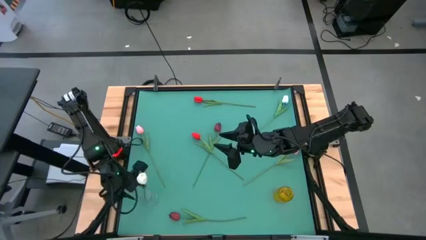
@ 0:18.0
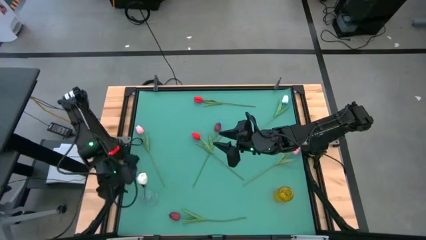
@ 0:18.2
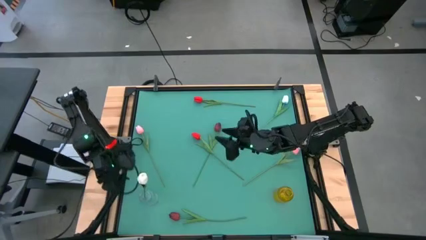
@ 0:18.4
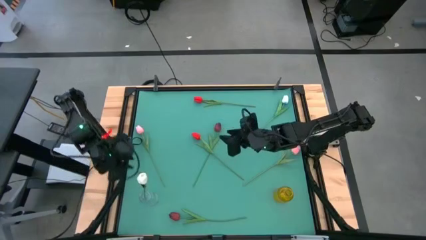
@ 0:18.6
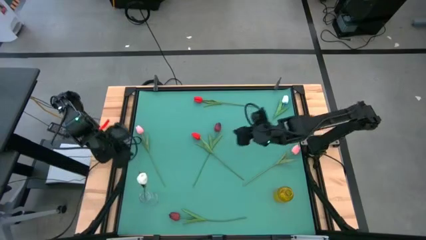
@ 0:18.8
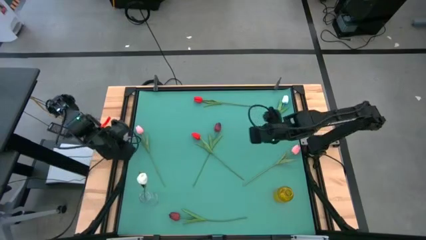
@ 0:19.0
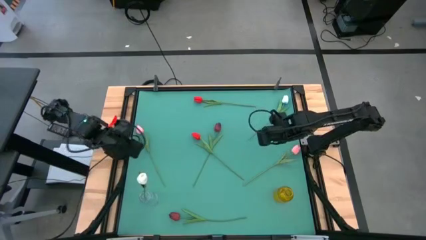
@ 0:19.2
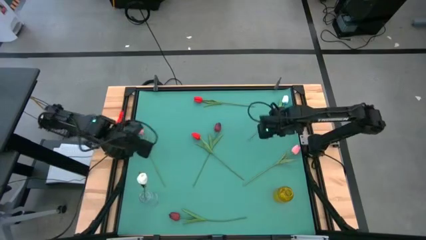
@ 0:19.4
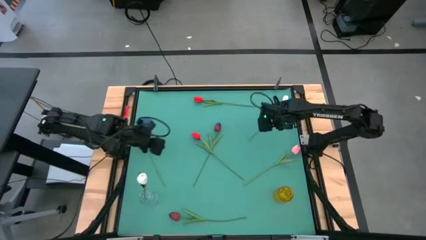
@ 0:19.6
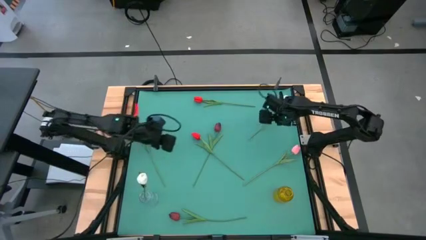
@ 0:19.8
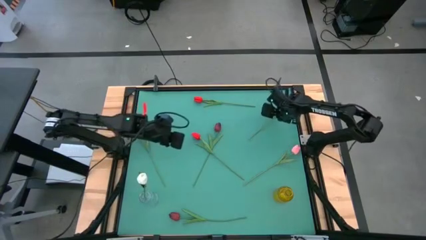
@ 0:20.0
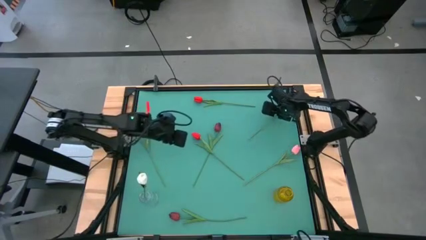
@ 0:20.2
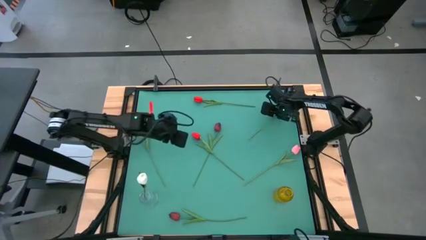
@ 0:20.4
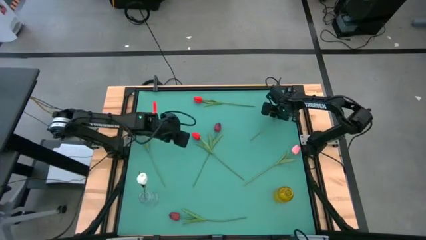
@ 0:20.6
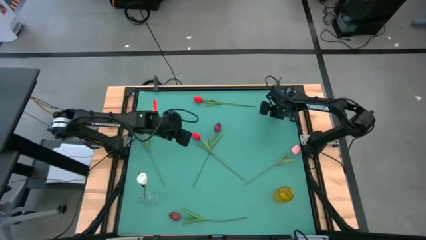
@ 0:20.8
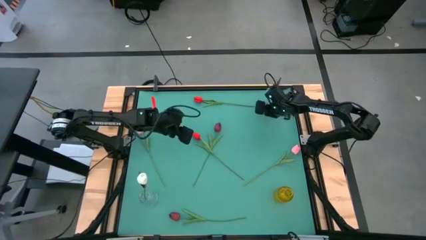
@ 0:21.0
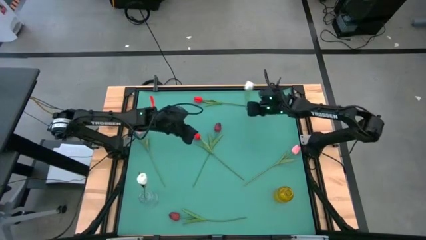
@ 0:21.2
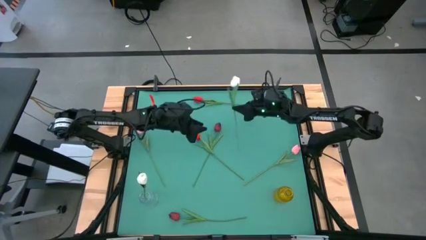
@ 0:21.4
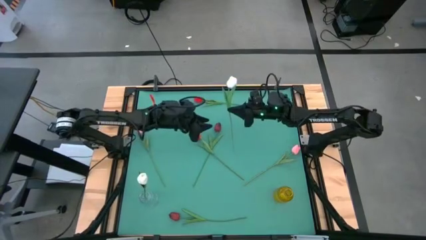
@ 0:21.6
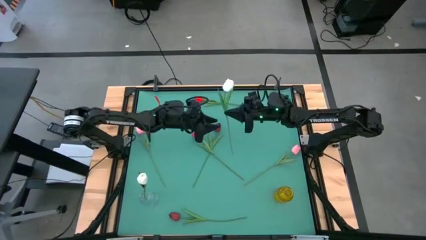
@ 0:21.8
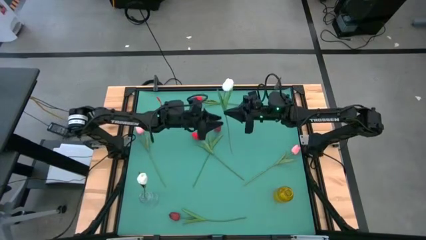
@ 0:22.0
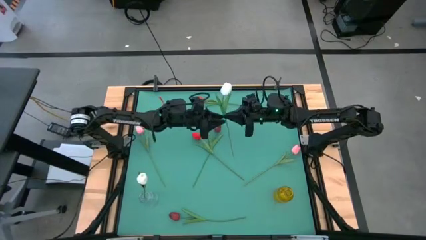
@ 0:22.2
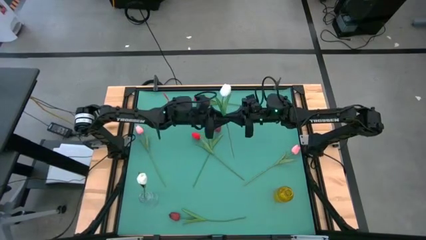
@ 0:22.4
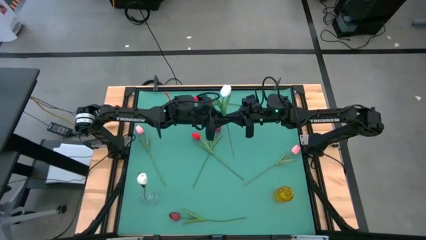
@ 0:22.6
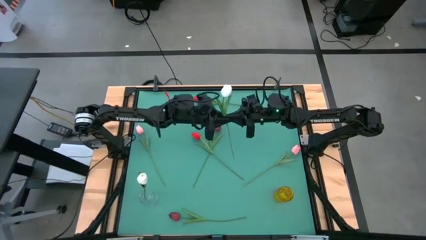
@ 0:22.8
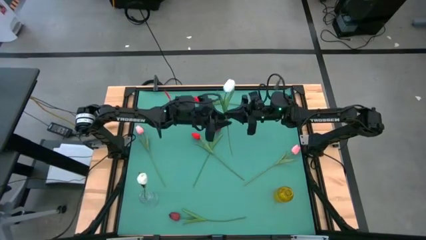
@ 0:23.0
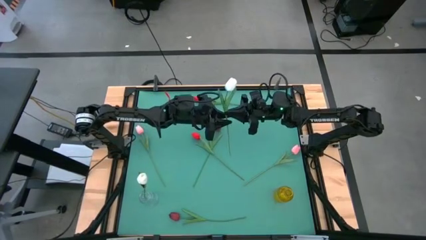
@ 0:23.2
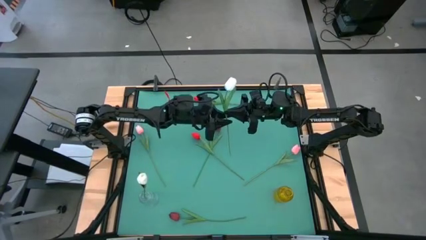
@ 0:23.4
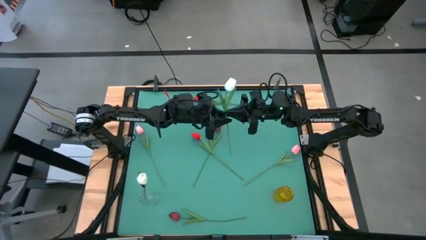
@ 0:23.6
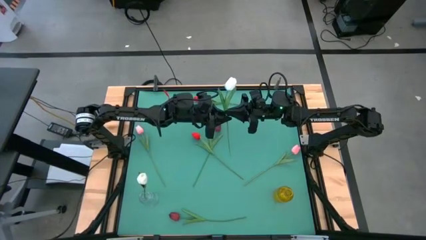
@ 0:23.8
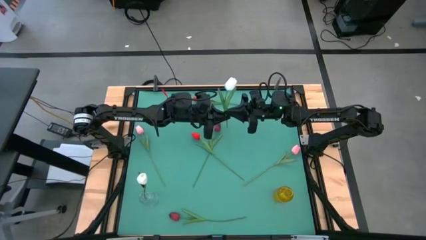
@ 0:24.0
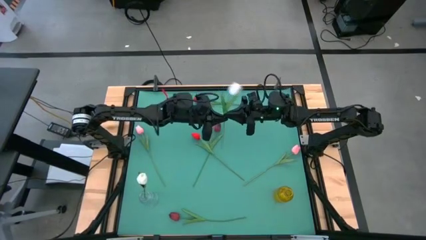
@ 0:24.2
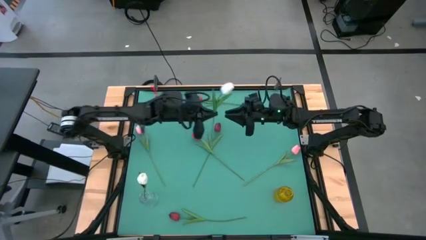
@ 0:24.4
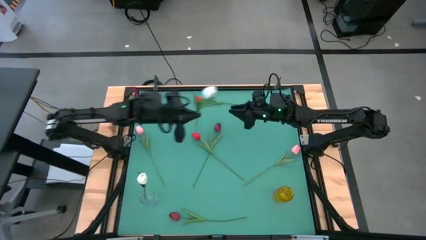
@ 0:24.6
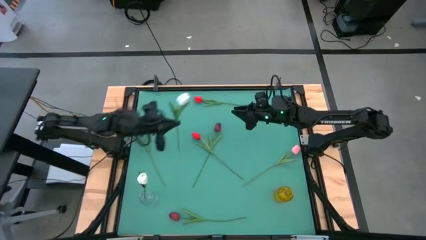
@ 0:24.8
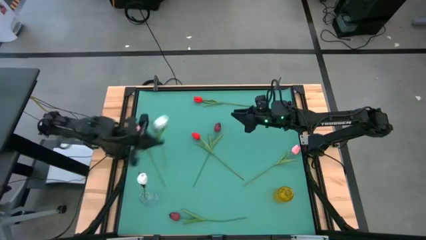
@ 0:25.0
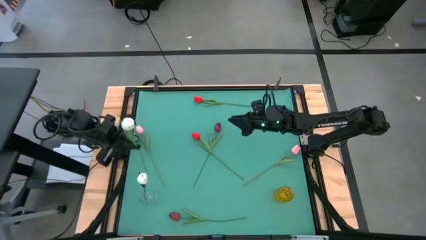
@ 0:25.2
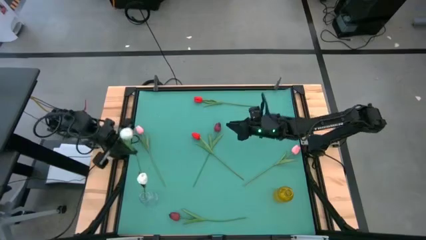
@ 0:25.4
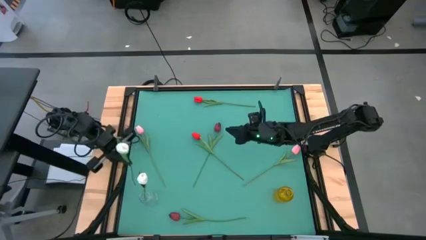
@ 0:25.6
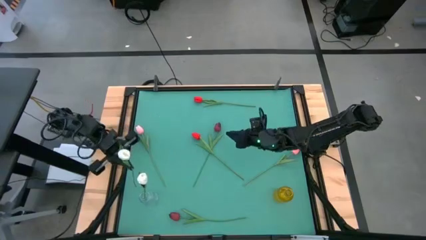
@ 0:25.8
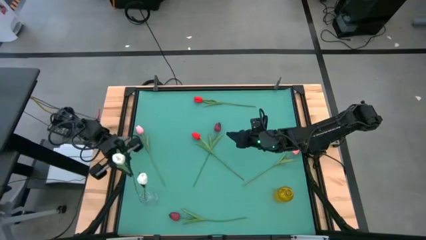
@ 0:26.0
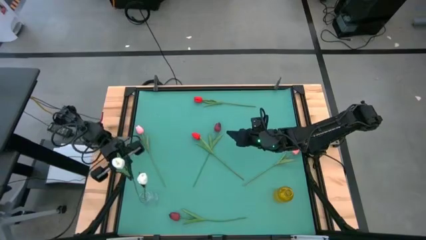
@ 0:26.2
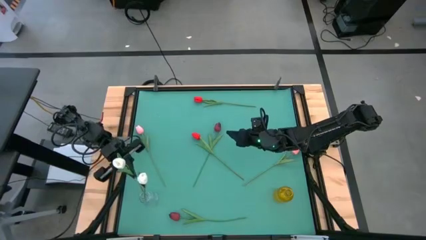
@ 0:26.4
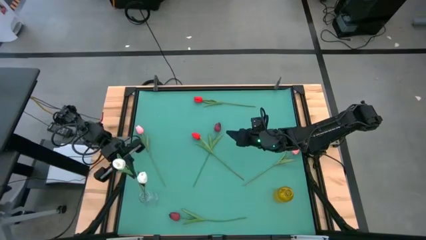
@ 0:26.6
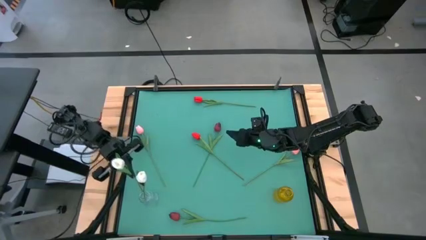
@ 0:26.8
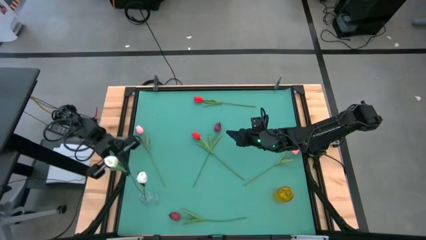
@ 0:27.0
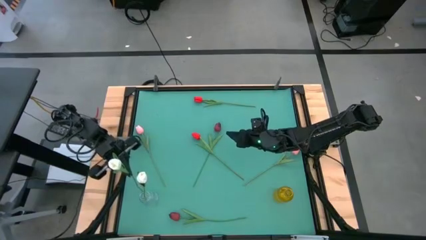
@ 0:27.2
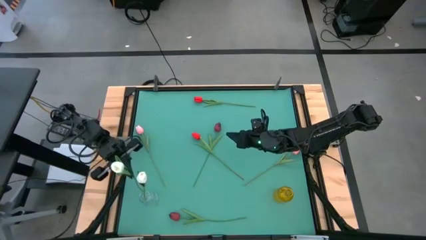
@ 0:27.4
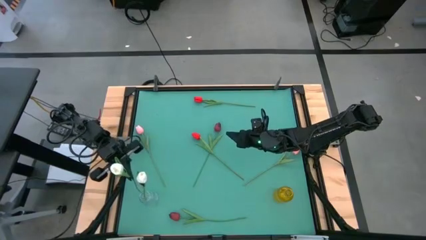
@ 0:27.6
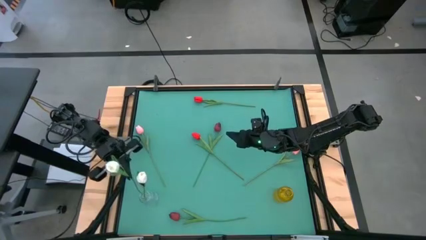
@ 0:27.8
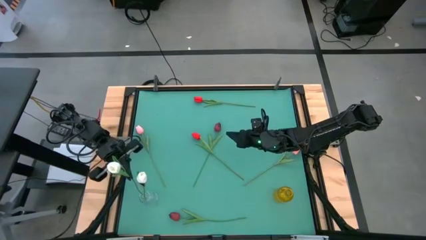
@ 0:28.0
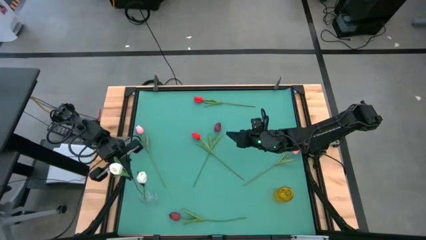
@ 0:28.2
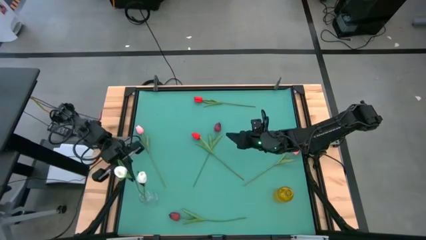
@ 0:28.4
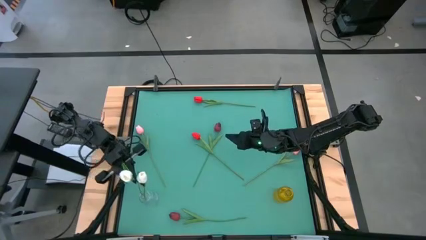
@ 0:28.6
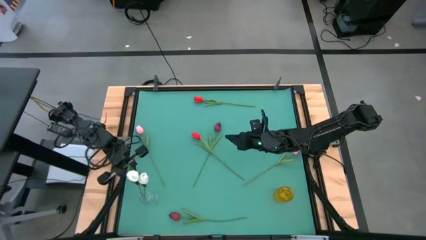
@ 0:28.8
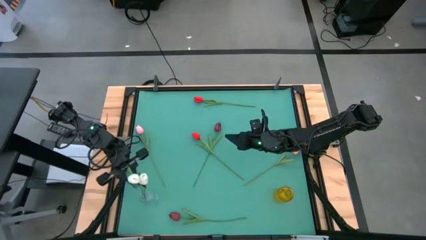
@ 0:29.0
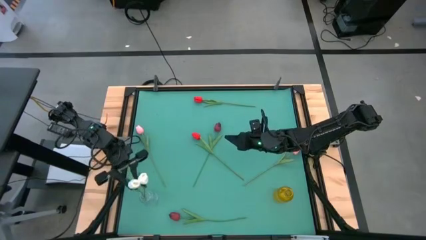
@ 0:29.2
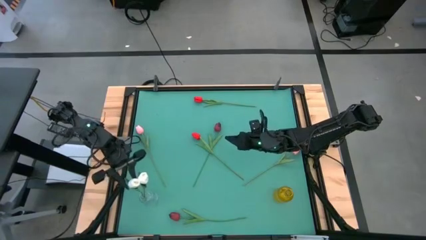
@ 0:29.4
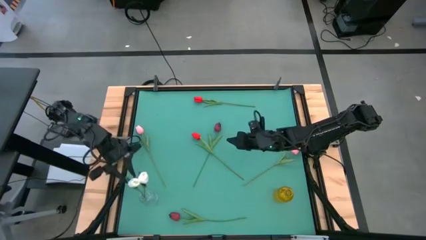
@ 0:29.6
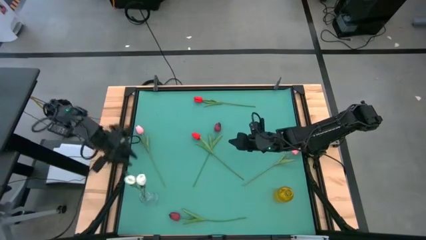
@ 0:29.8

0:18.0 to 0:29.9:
Task: Sort flowers into vase by color
Put the white flower into the transparent vase

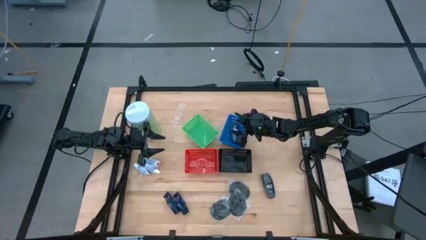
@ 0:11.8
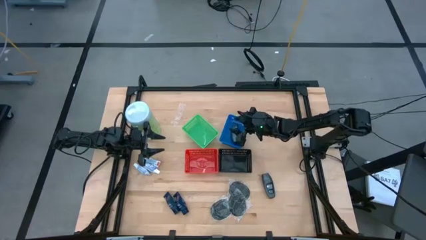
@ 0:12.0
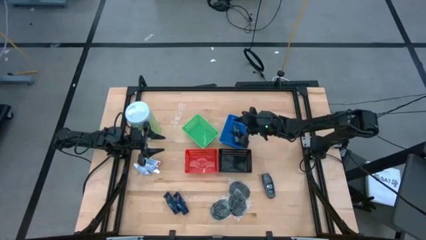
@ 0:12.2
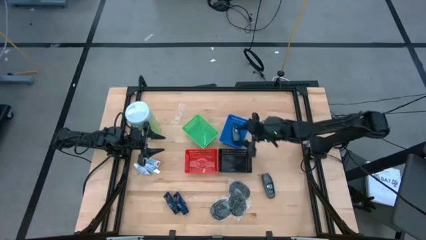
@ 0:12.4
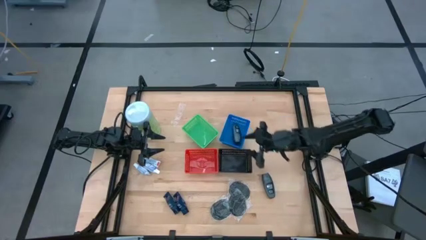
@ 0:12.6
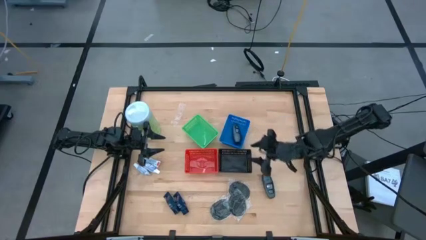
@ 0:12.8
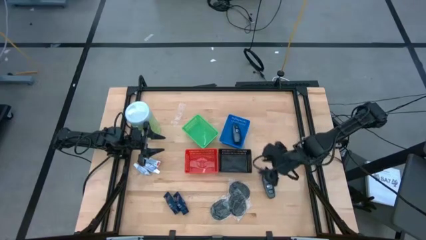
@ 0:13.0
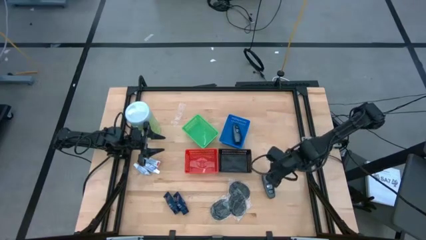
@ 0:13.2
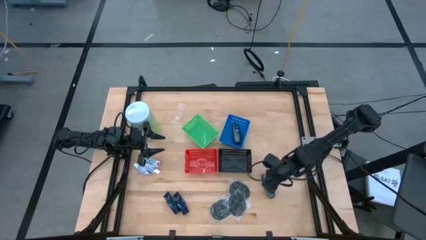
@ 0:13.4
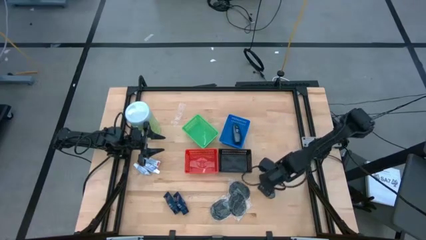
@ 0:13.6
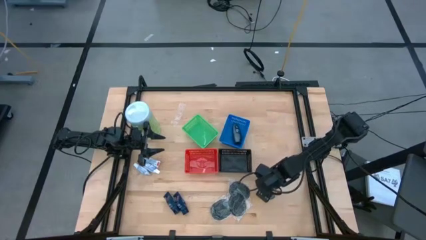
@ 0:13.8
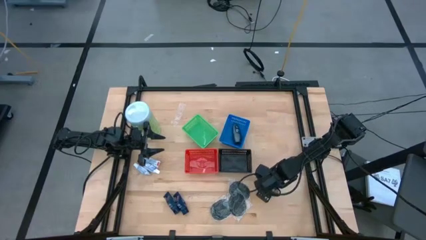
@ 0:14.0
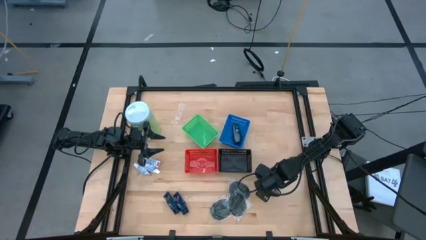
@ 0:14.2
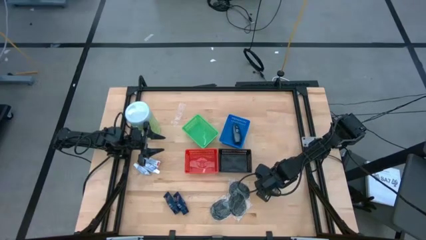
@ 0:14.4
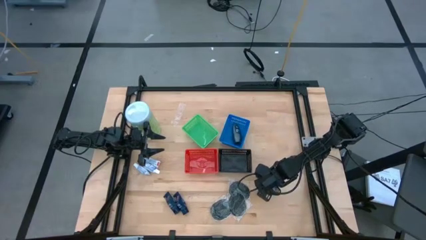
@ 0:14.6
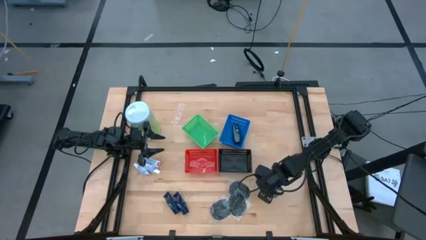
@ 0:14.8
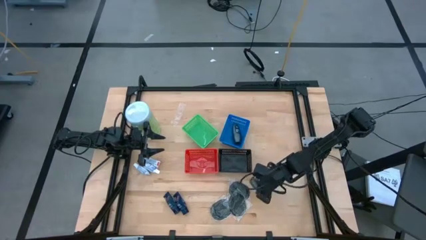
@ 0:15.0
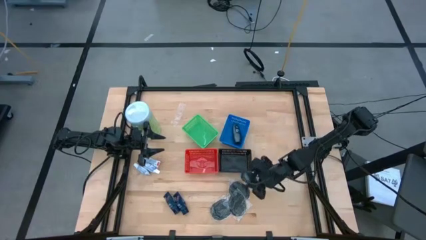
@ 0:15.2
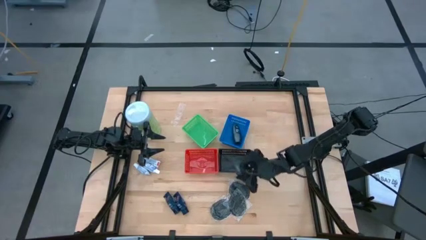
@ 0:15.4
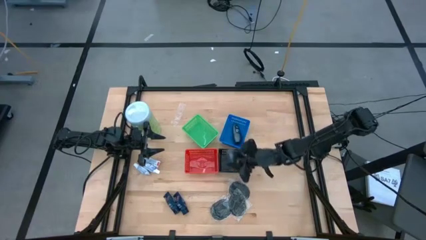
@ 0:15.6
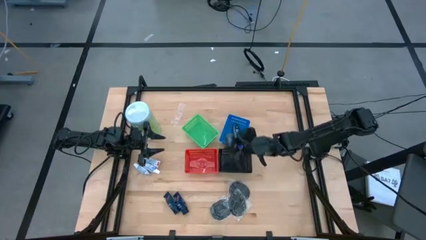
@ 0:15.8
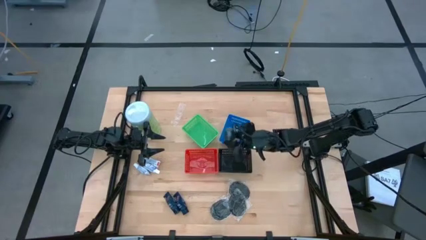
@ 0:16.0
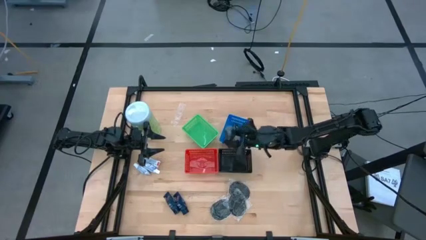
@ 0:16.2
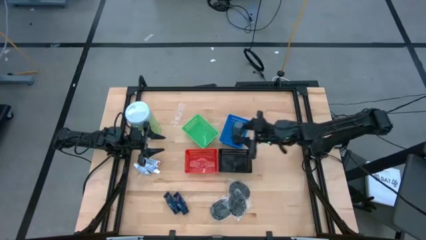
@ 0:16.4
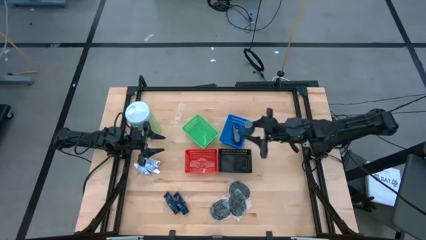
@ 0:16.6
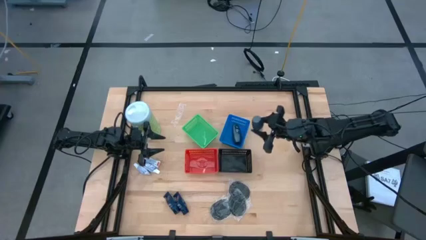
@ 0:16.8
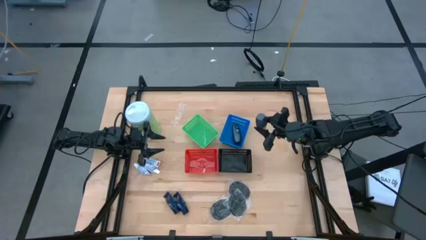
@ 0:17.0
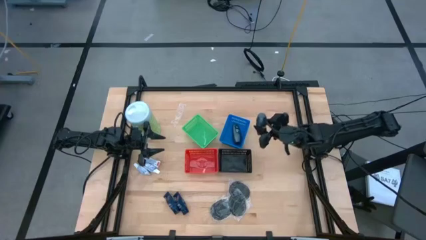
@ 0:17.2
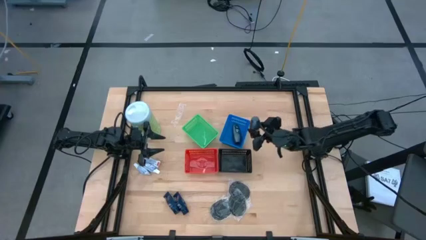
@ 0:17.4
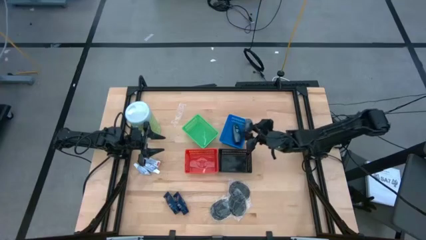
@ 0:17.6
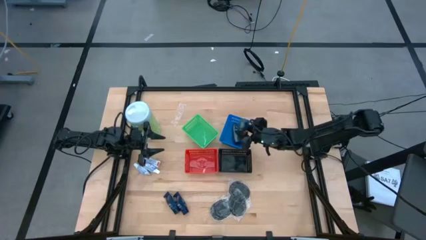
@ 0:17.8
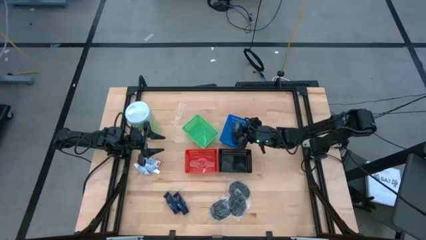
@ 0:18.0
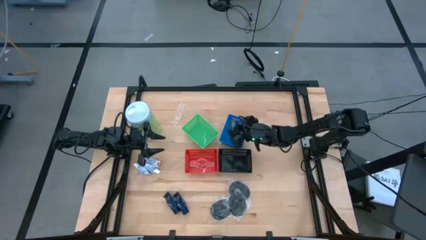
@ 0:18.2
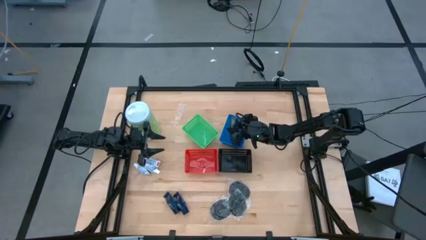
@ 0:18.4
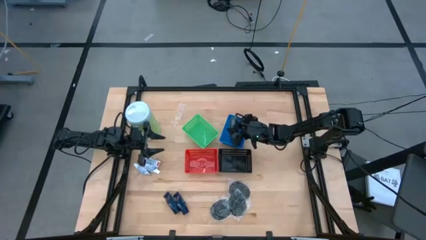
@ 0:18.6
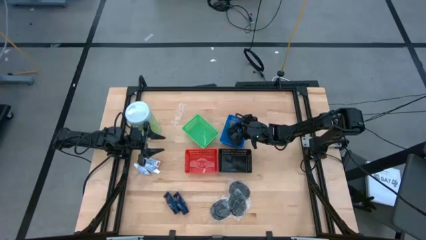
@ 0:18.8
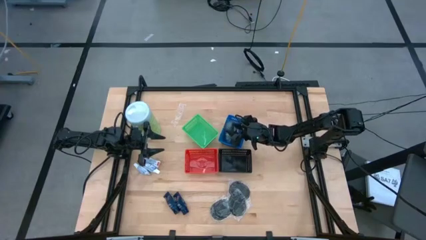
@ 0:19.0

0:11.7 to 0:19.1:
Task: Pick & Place Travel size toiletries
Put the deodorant into the blue bin
